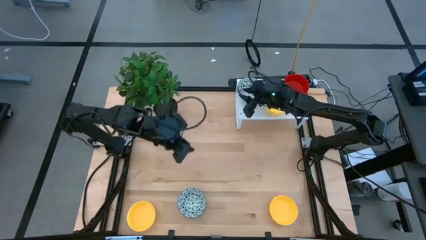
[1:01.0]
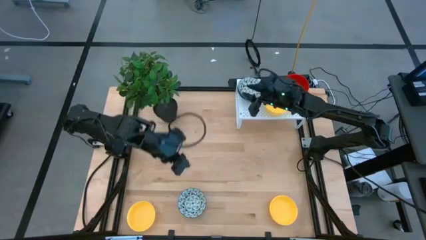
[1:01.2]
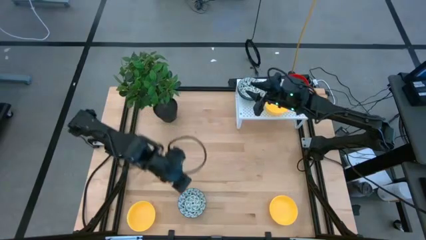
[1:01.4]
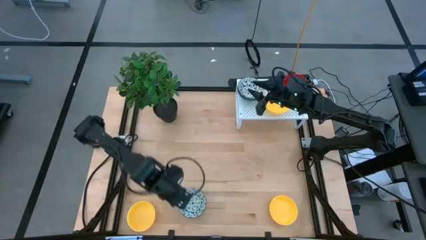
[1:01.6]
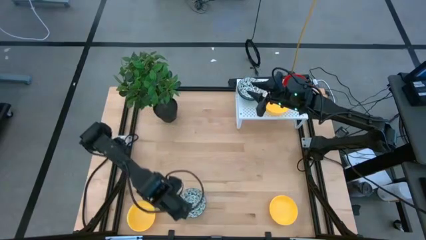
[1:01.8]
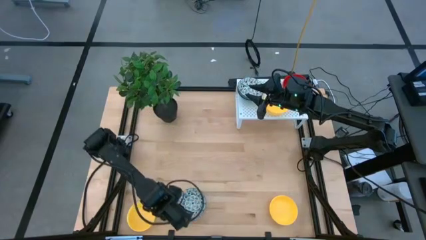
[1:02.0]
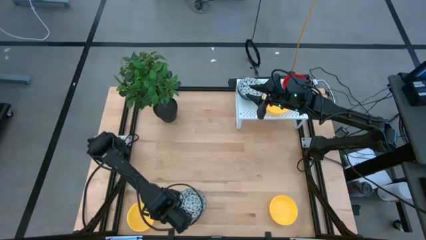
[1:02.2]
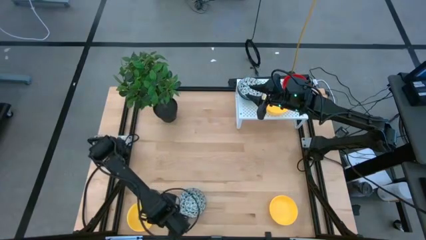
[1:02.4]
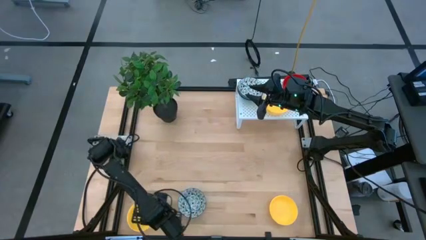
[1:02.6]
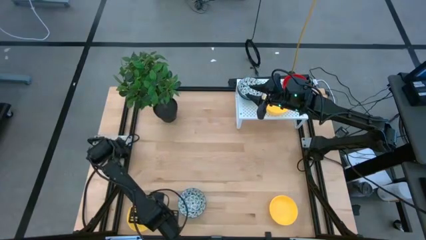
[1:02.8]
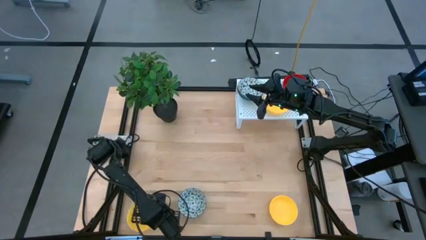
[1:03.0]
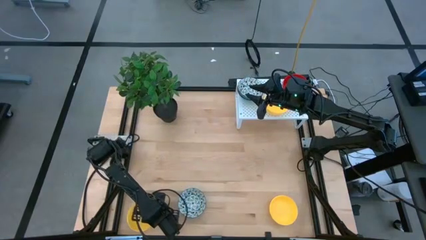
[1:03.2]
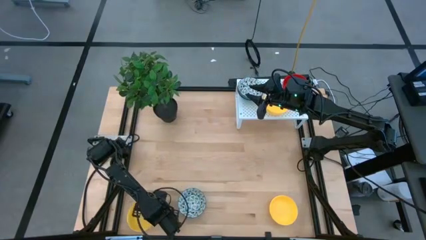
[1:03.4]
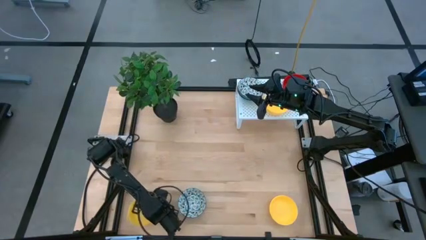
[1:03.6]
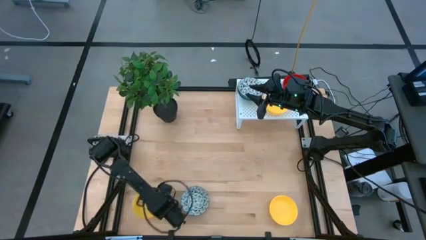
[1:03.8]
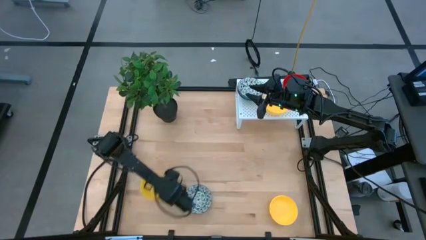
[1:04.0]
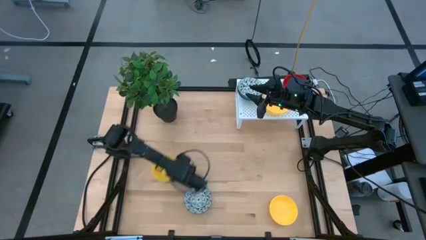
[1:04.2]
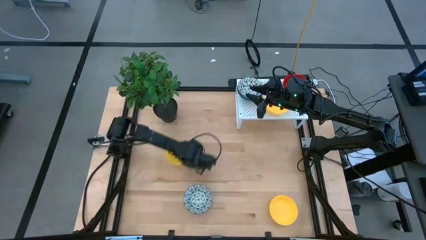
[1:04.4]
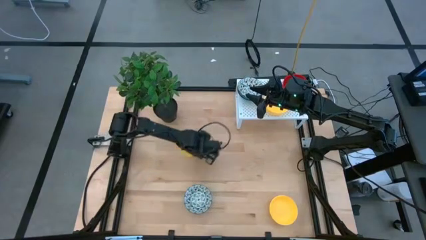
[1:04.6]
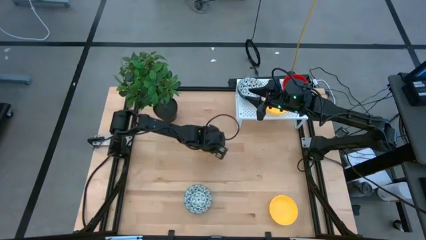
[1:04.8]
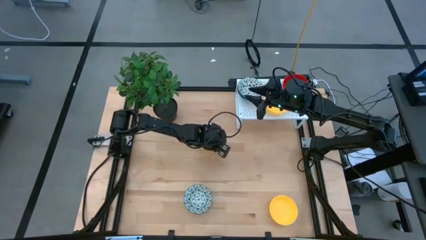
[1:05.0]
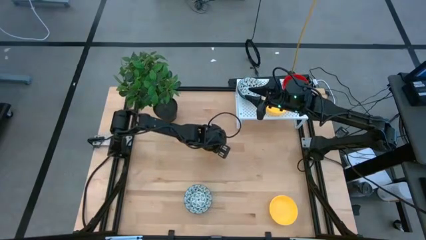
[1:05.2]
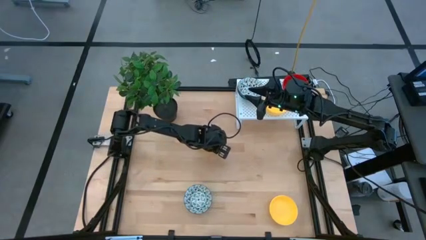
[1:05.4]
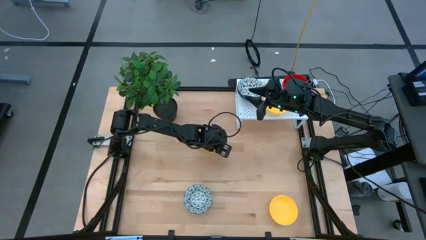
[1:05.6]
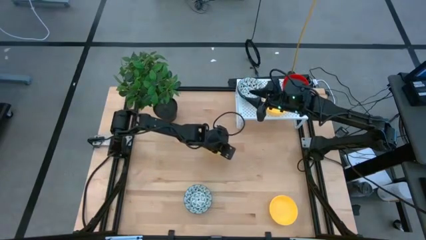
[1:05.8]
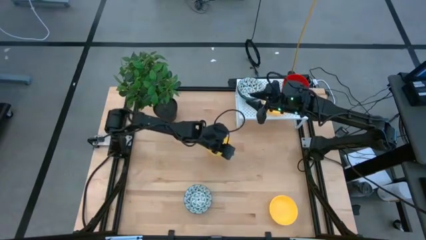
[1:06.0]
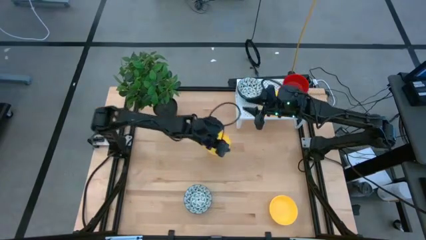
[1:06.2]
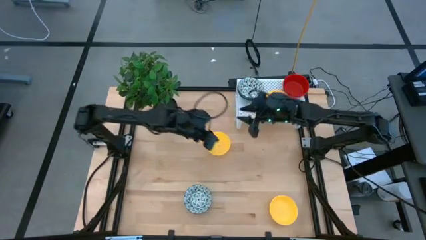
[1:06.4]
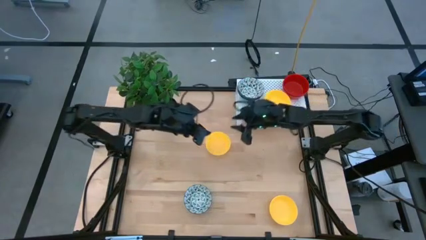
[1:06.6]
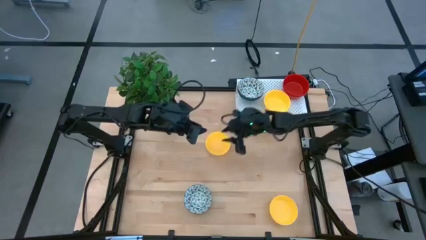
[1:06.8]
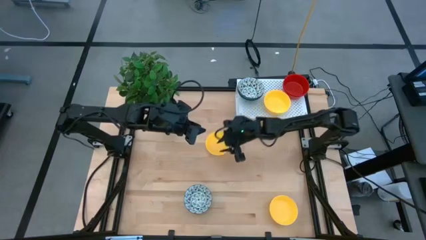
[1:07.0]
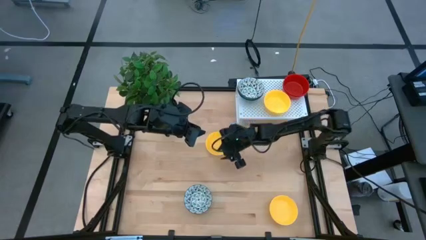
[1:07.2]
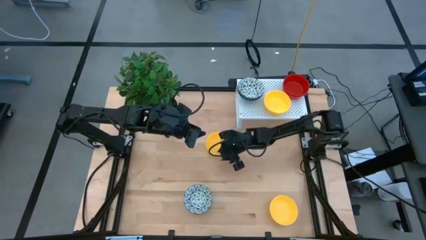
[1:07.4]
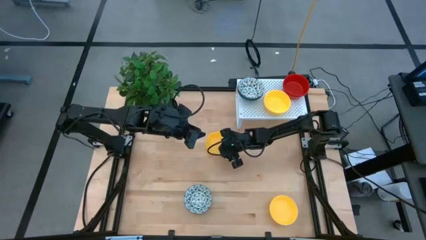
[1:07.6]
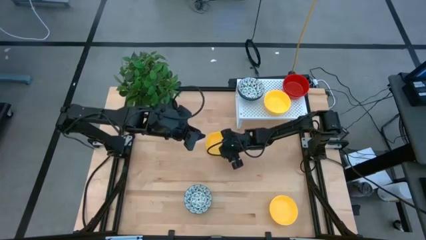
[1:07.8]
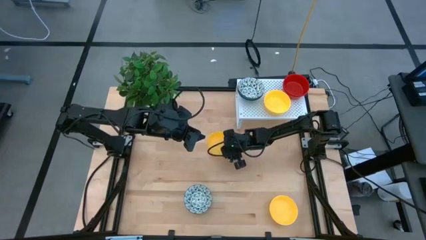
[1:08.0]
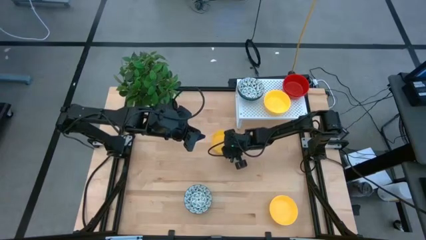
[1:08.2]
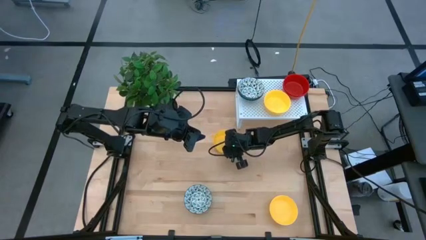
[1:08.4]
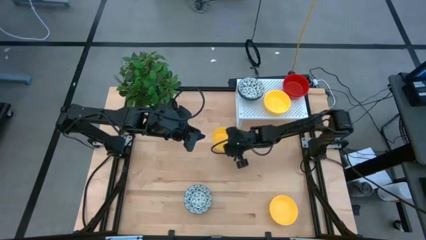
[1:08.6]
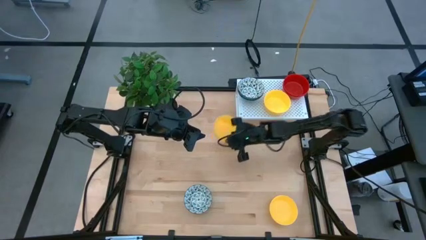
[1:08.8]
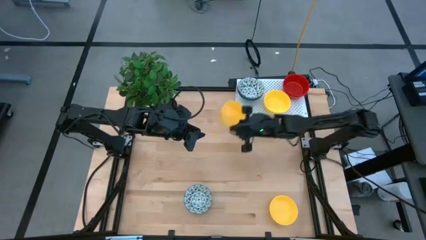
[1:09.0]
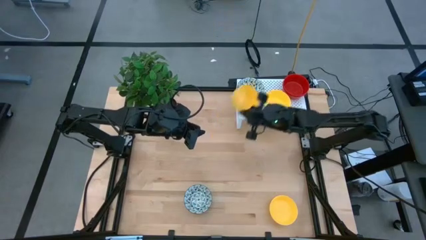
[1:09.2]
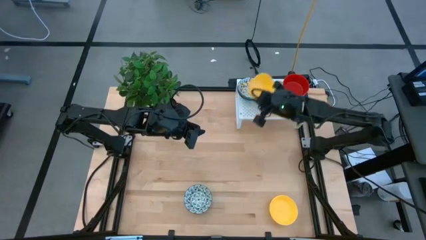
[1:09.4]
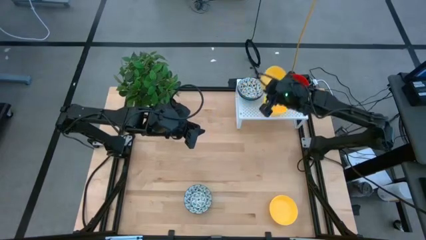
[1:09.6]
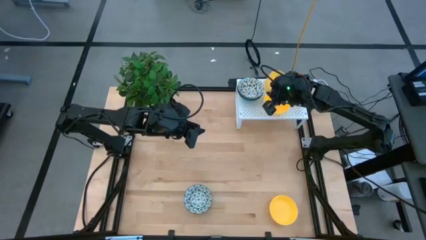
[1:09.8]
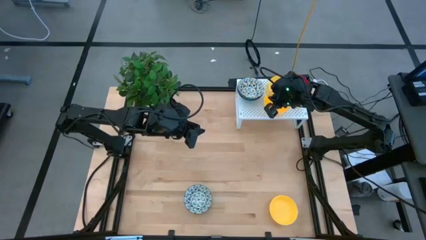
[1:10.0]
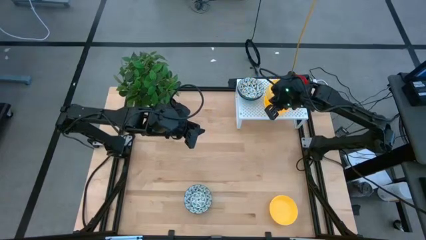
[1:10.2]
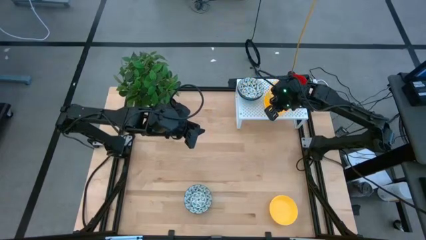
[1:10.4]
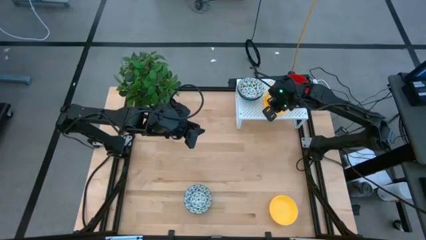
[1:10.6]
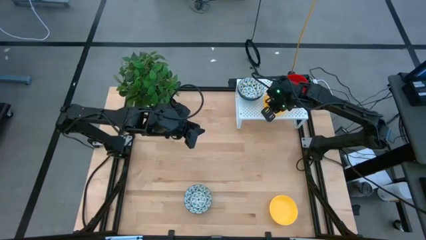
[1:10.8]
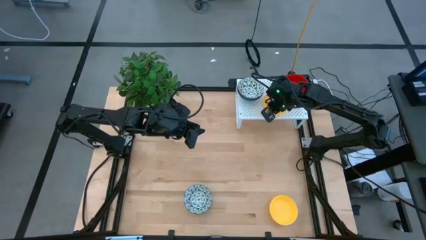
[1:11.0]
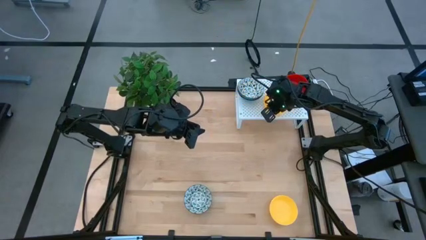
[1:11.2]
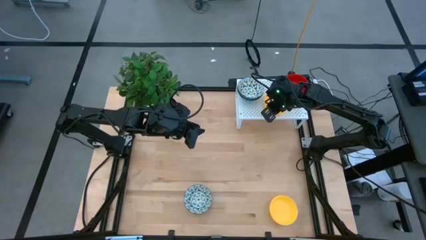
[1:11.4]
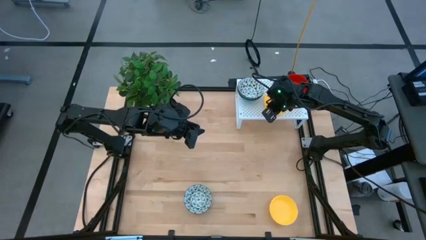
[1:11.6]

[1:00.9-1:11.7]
Task: Pick & Place Mini bowls
Stack the yellow bowl on the yellow bowl on the shelf

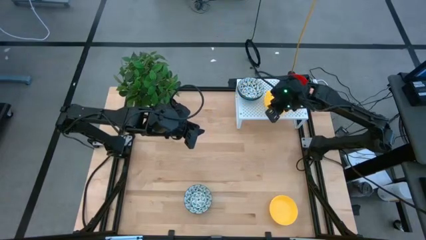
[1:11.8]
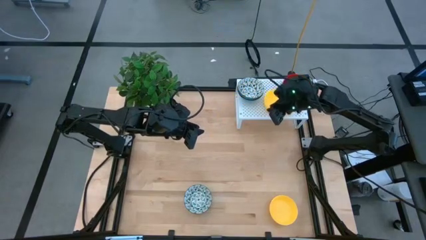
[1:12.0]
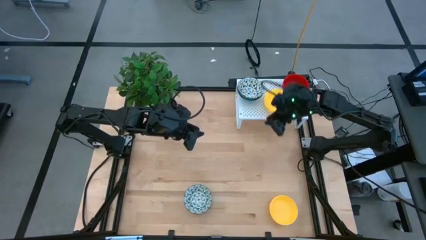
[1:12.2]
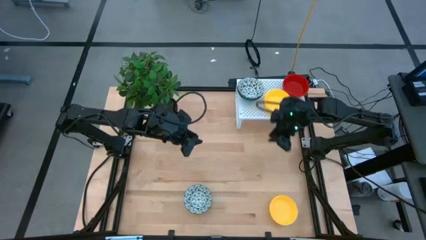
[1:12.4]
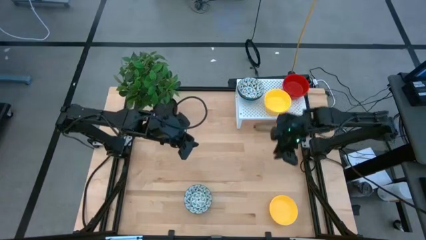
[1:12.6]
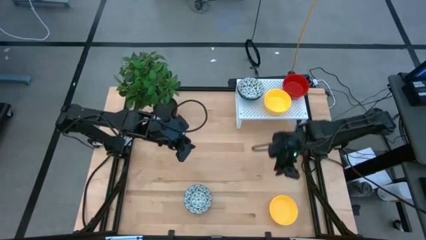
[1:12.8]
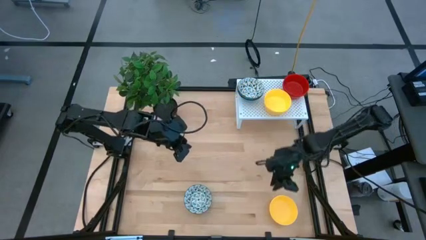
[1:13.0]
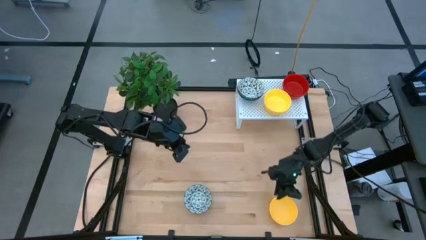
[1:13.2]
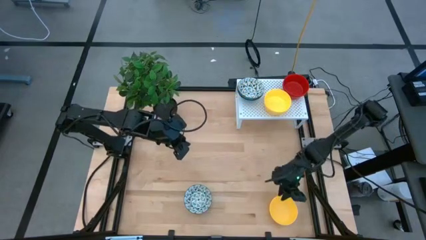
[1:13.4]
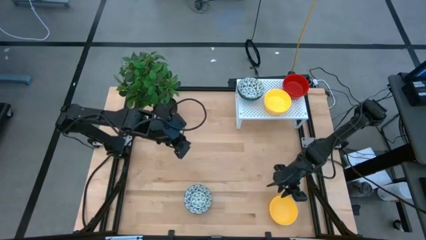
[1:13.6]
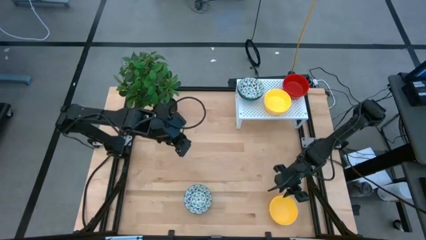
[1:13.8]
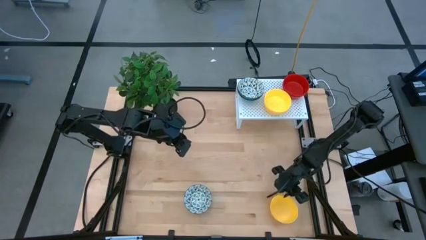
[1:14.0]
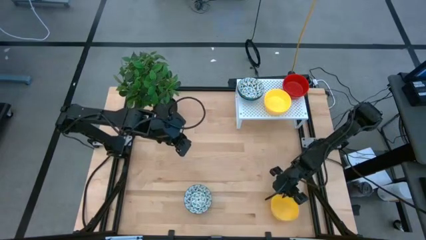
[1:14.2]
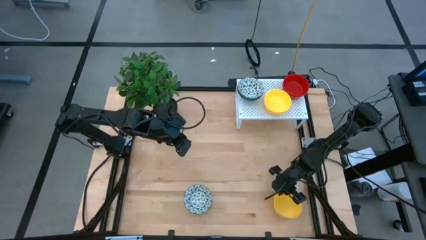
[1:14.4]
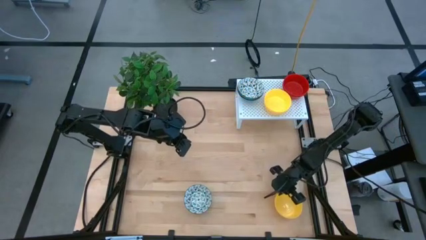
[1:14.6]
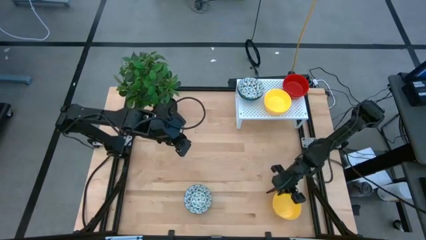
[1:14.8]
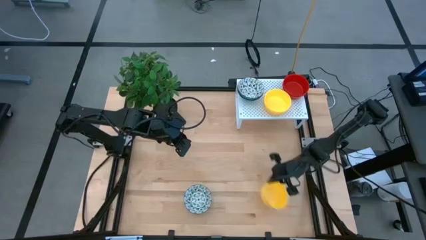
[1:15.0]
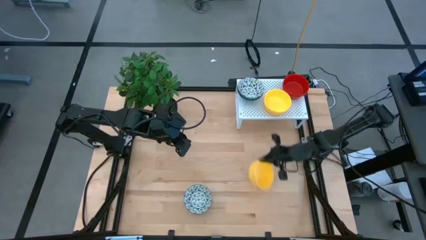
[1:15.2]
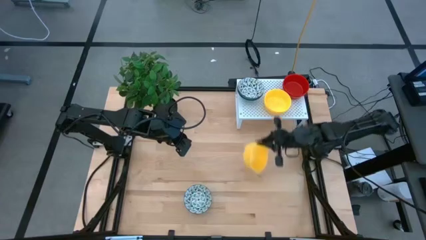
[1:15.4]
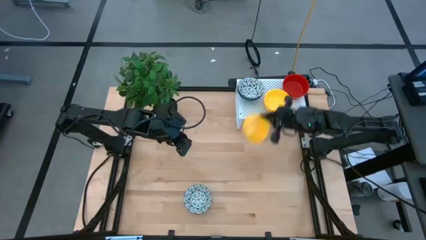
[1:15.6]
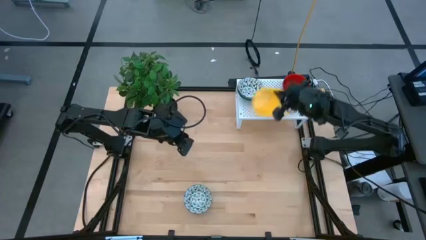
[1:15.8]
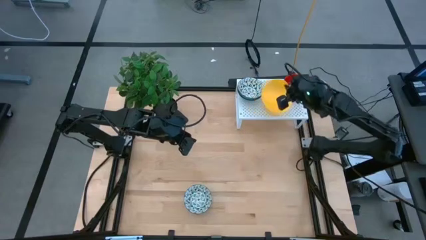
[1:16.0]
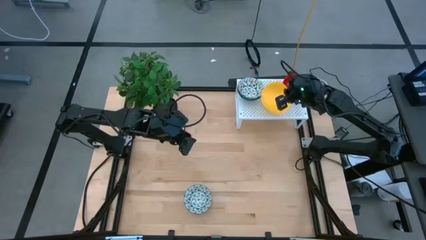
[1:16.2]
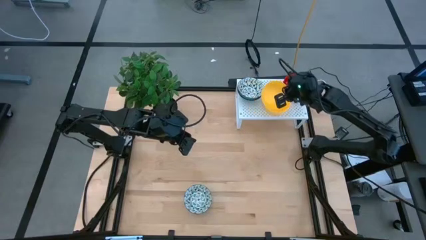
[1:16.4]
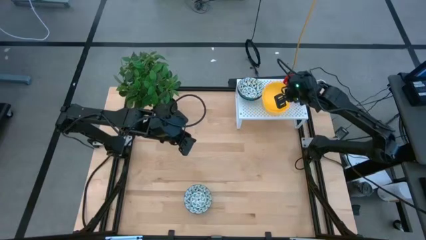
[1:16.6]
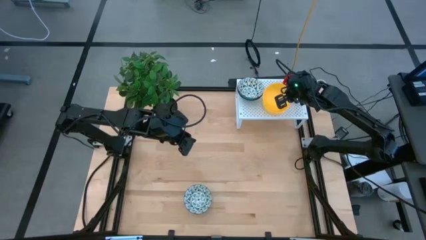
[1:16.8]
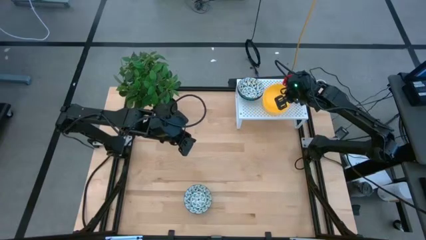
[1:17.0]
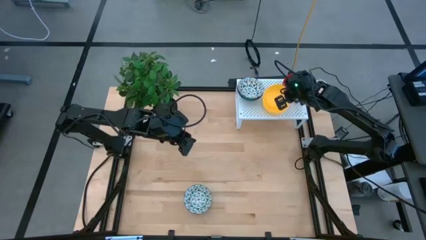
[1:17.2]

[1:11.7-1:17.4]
Stack the yellow bowl on the yellow bowl on the shelf
